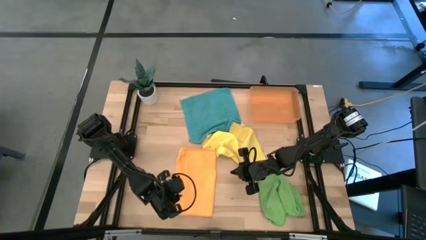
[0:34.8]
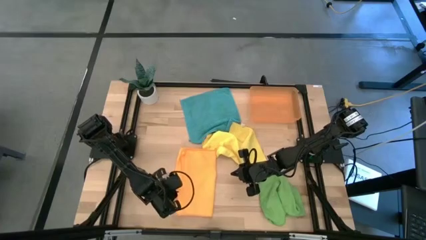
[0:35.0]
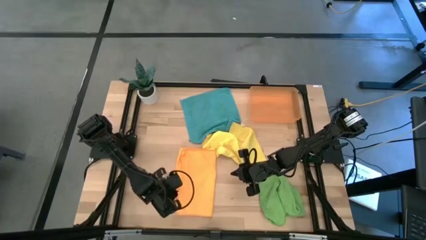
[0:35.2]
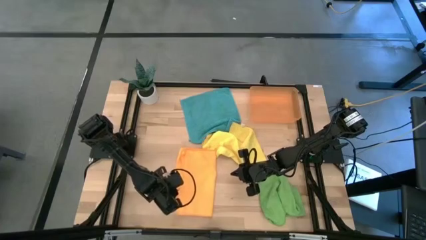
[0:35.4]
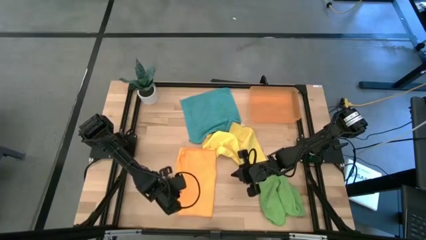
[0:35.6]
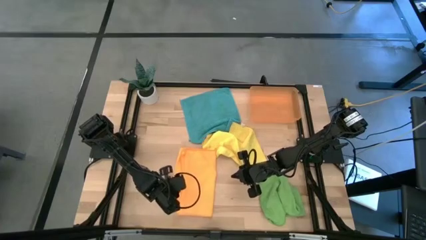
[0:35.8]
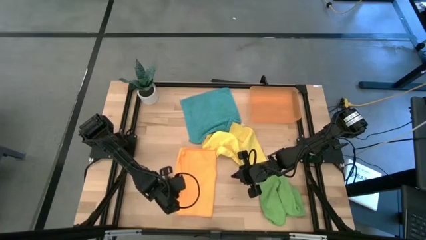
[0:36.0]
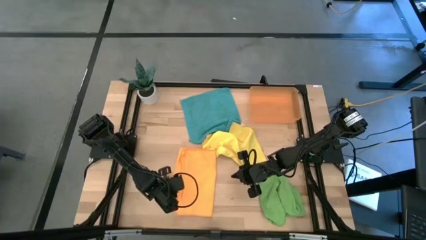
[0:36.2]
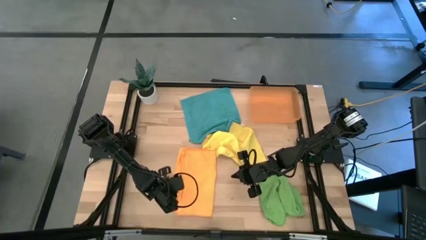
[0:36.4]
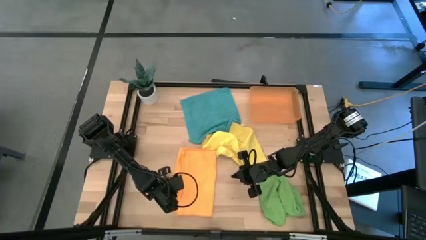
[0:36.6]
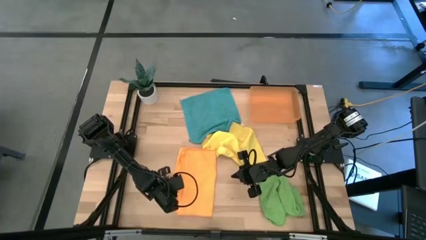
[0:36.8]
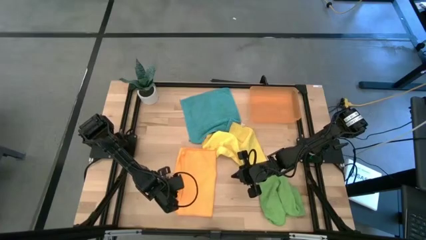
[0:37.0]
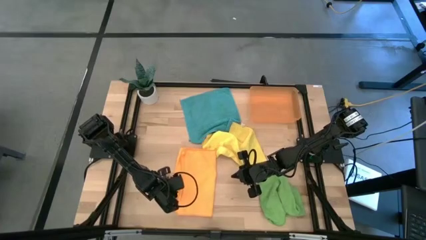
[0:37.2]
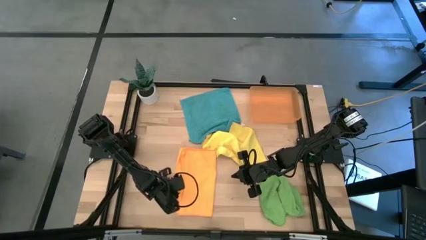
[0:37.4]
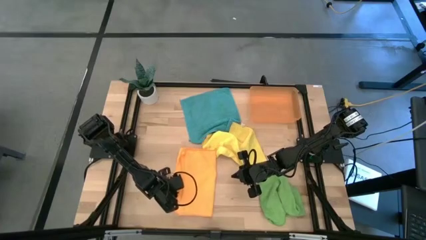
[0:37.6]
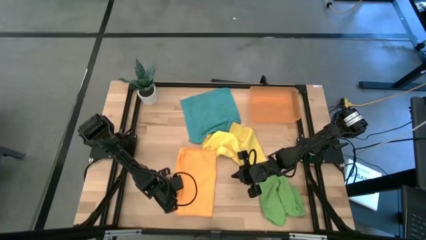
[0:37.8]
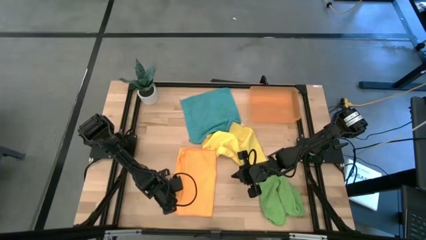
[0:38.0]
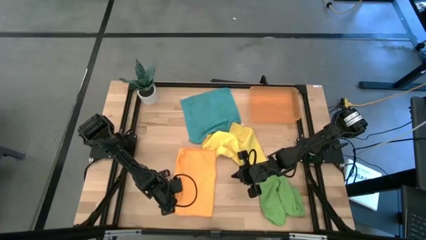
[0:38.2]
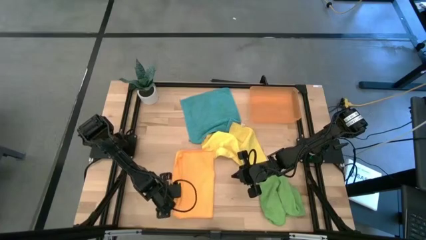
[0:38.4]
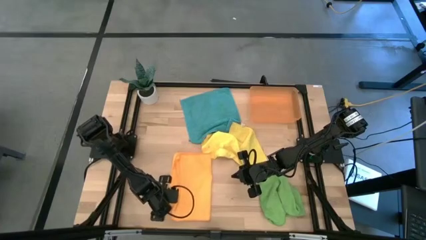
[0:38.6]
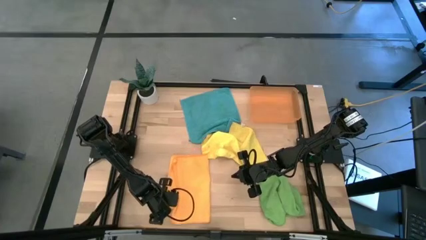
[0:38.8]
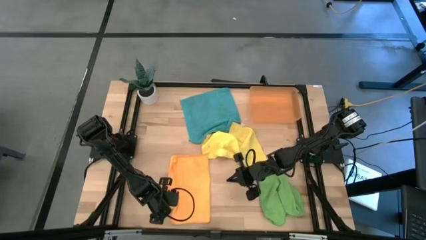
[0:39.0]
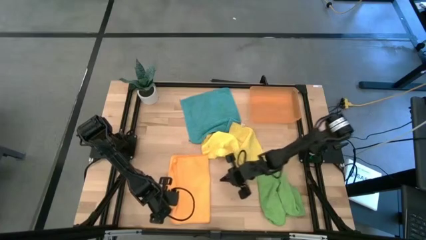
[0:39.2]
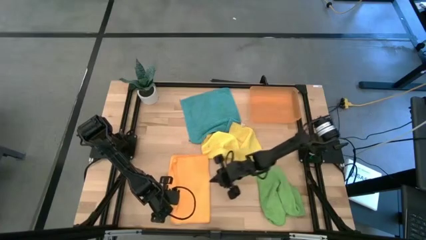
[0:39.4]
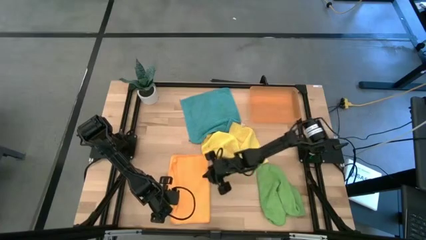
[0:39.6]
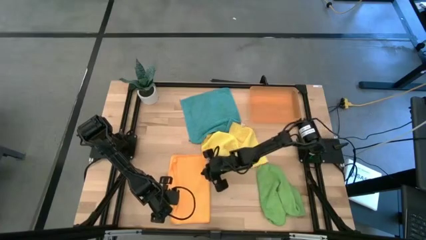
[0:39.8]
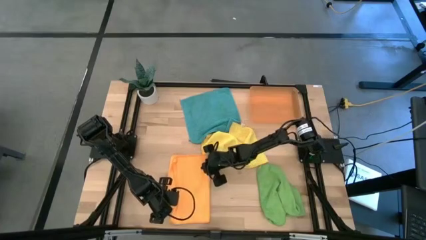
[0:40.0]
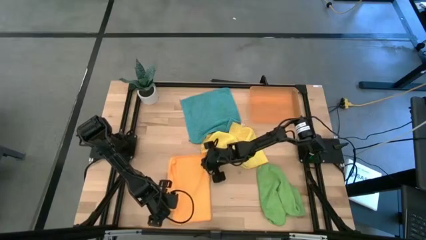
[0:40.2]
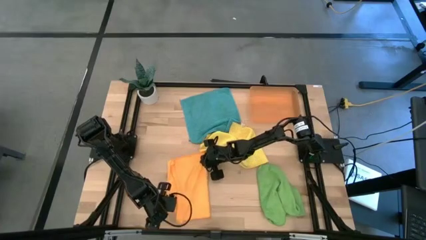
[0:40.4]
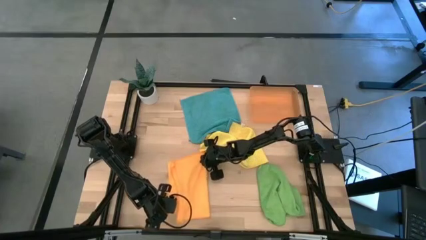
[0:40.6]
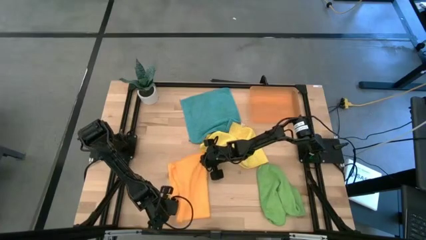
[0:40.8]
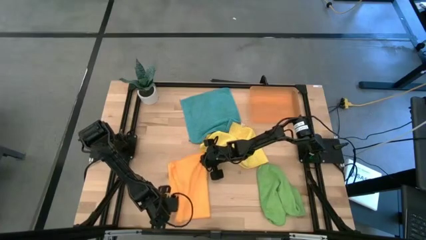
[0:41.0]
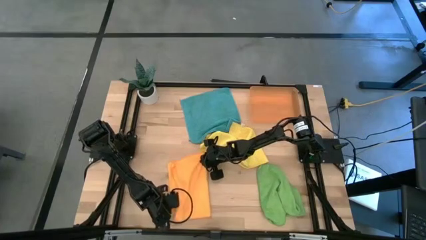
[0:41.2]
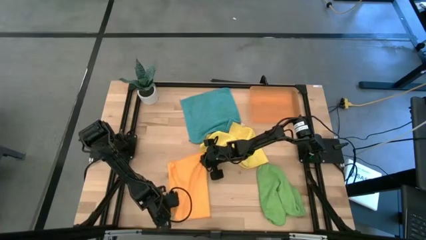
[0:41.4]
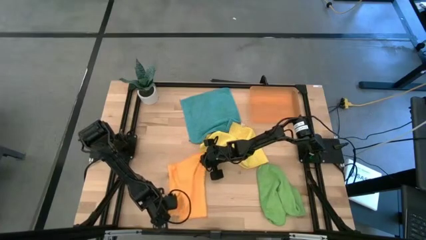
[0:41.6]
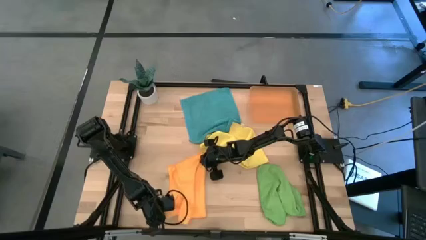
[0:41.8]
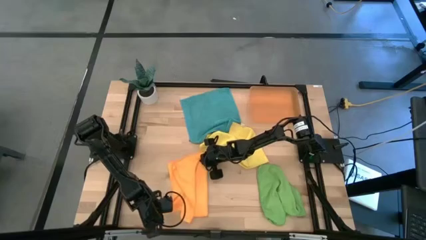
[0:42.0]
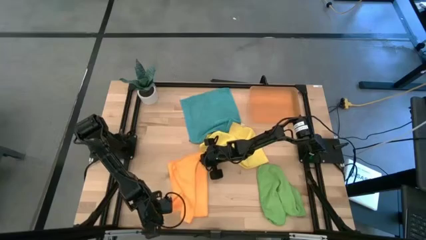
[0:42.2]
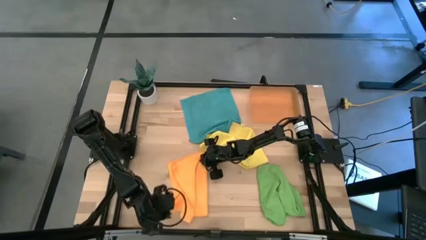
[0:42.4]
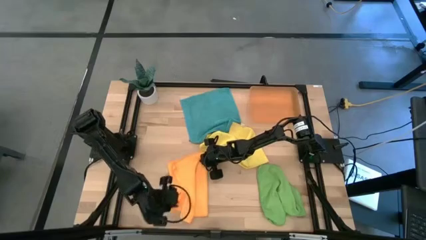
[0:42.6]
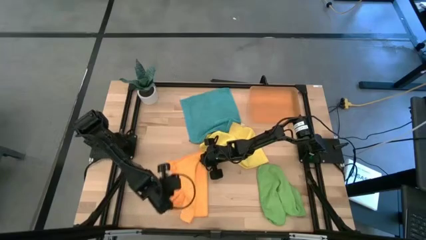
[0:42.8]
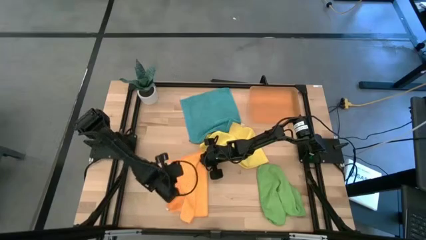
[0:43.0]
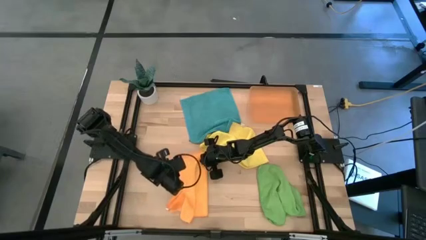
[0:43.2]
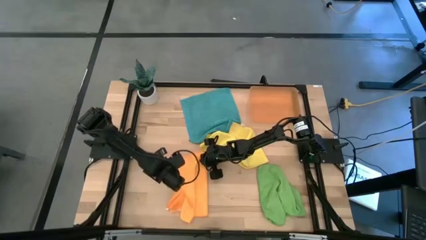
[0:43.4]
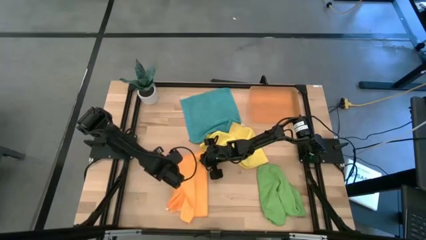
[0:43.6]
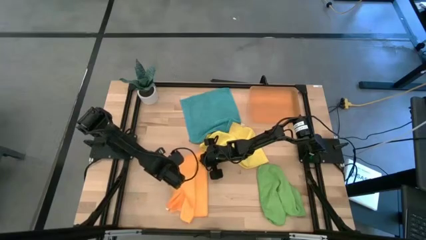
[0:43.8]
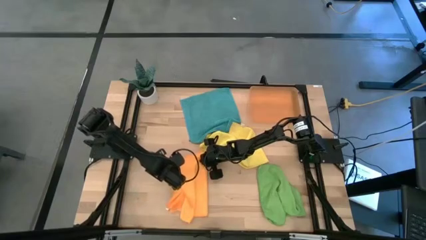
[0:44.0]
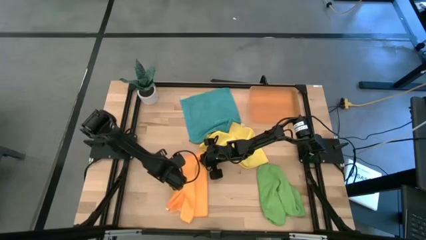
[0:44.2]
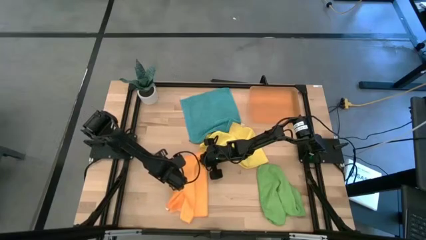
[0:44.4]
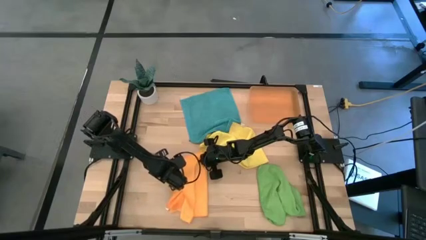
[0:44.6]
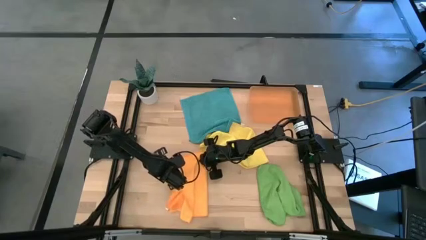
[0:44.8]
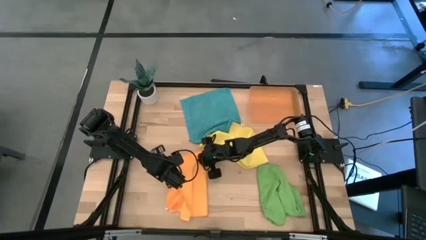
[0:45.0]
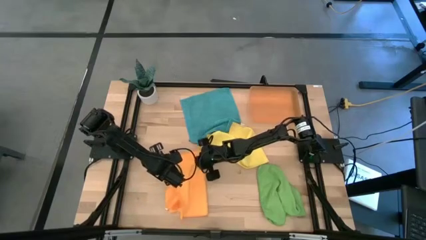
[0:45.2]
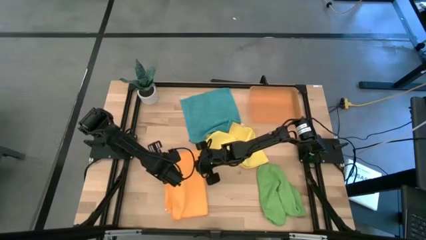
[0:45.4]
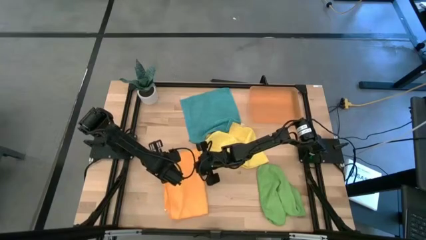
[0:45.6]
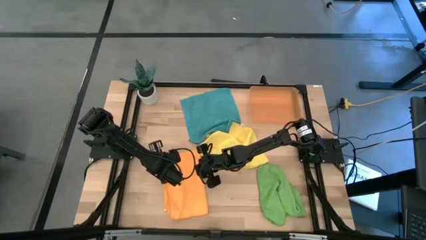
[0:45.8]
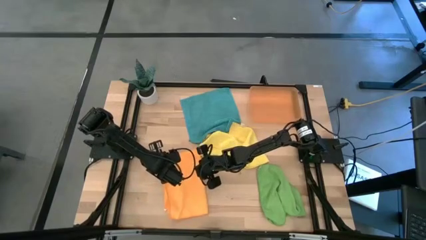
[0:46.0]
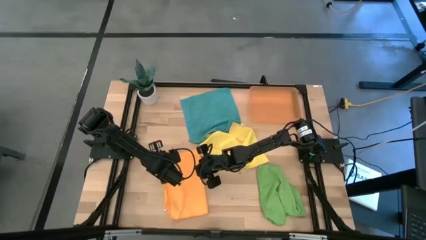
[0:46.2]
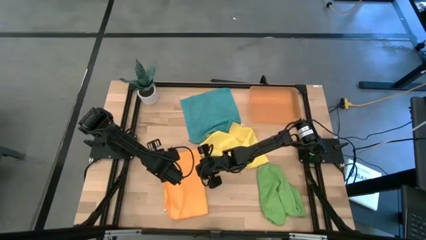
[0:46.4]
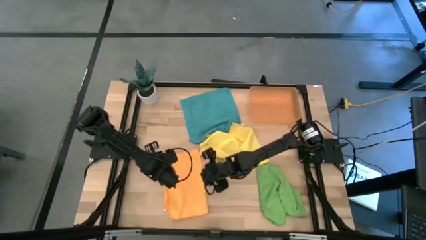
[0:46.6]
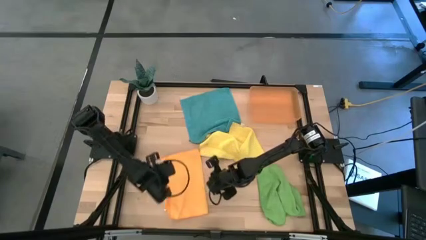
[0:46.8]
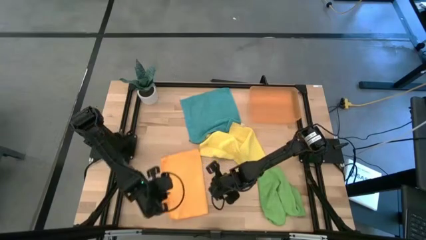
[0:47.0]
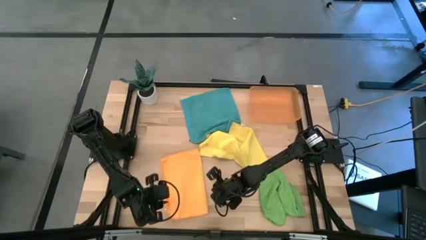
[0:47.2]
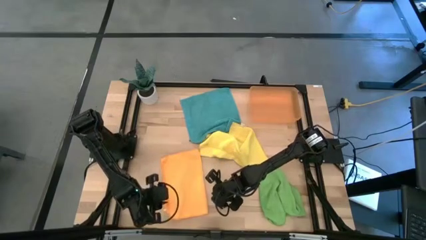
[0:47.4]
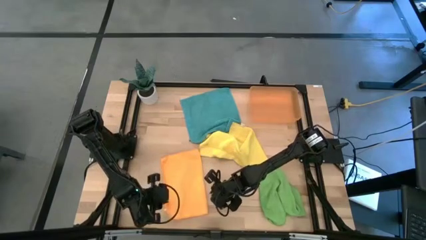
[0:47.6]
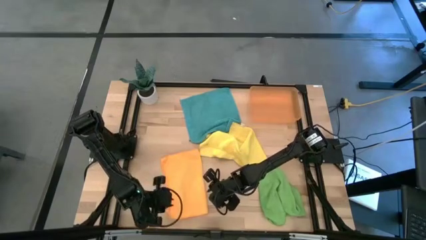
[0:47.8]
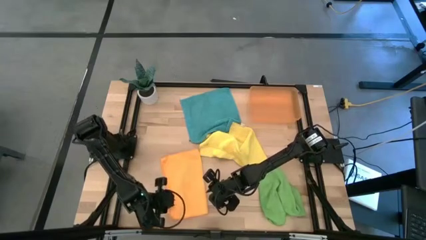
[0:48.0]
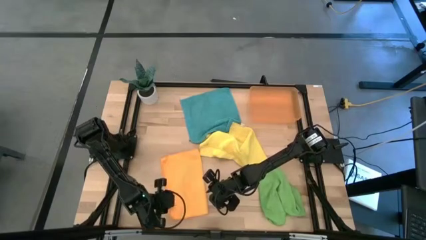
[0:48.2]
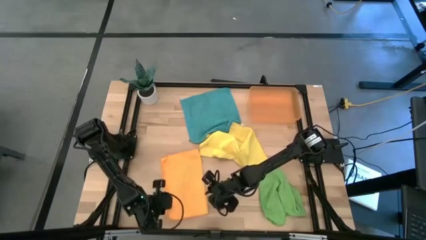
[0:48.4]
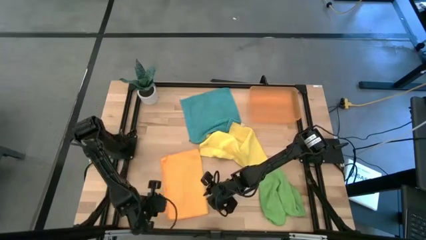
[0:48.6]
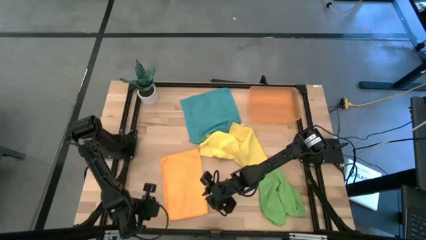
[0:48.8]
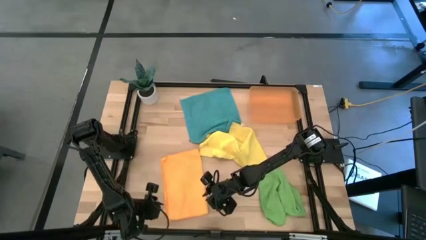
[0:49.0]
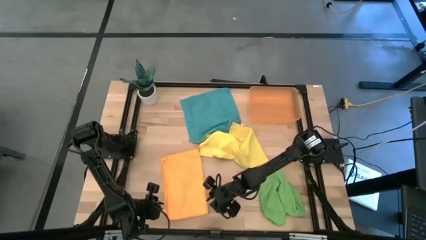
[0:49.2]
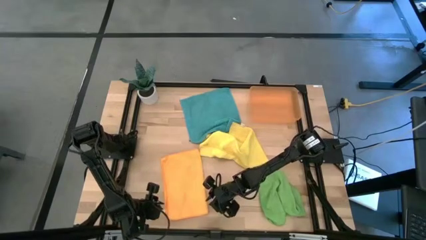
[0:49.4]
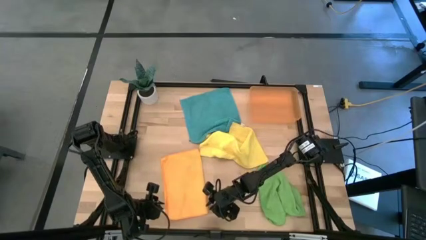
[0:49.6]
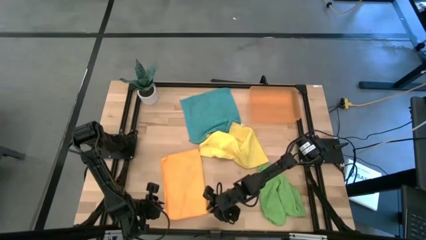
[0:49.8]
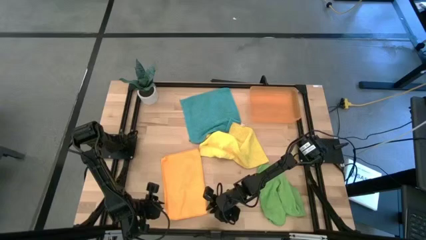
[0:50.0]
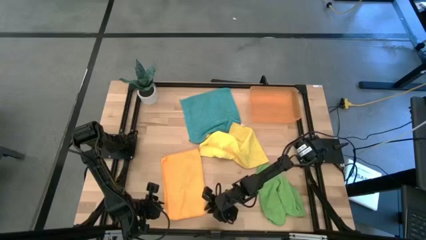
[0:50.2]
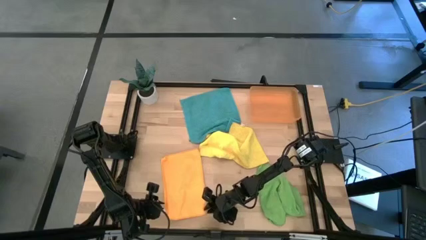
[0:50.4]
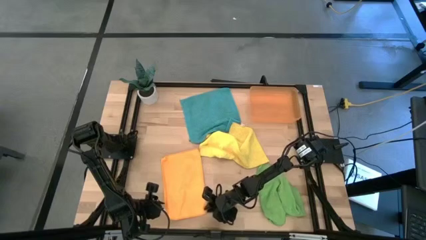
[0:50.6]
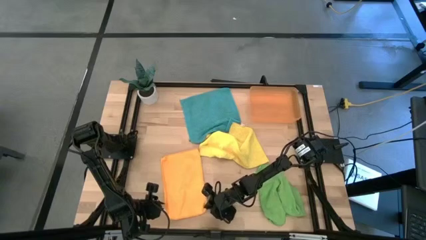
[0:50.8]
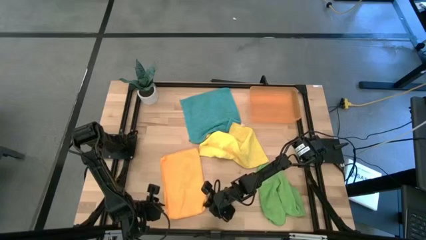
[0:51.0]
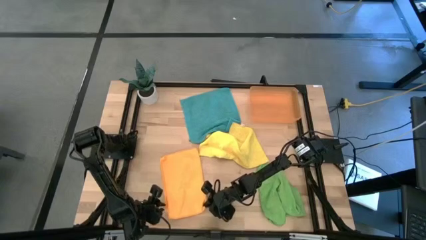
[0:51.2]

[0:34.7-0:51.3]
Task: Roll microfiber towels into tight, uniform cylinder then place into a basket
Roll the orange microfiber towel
